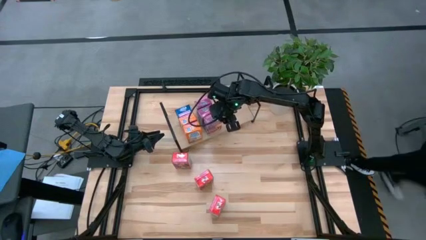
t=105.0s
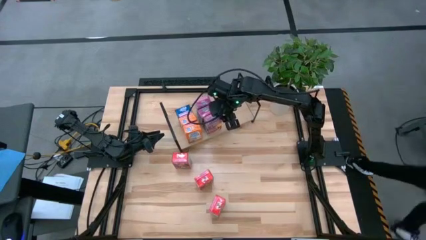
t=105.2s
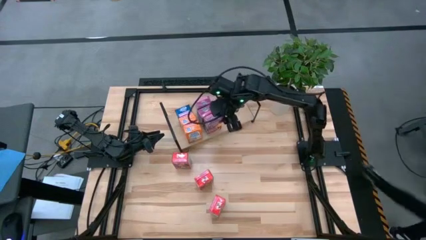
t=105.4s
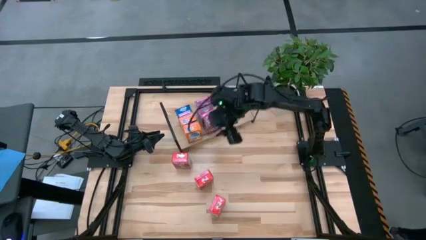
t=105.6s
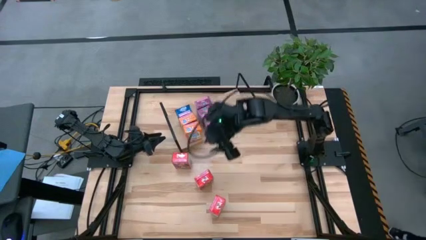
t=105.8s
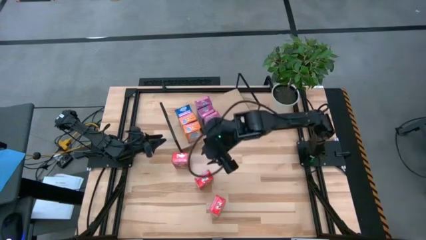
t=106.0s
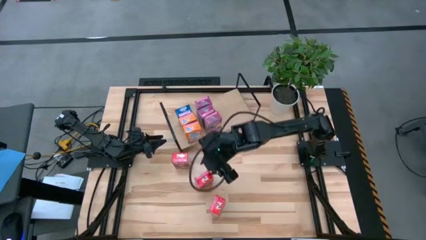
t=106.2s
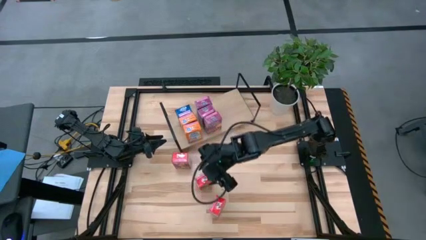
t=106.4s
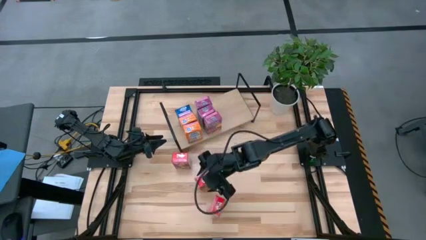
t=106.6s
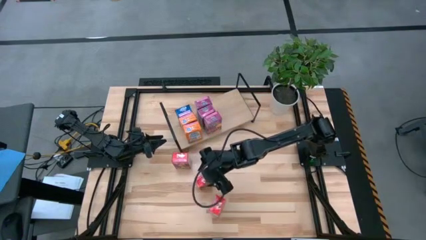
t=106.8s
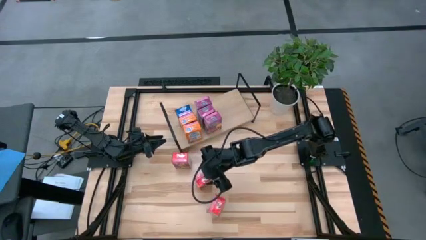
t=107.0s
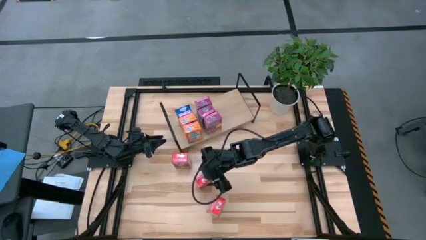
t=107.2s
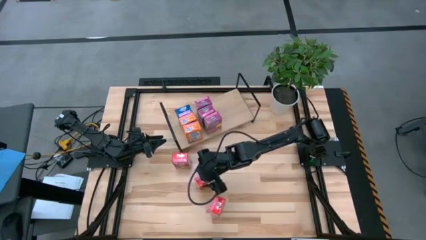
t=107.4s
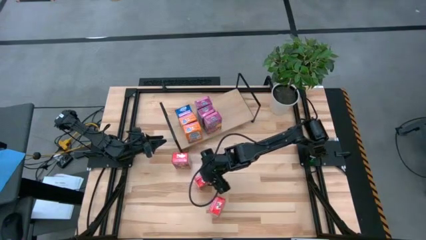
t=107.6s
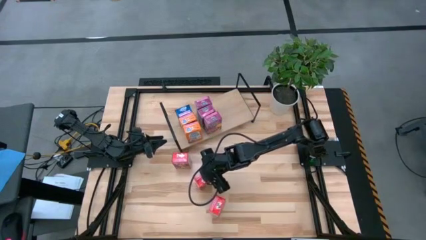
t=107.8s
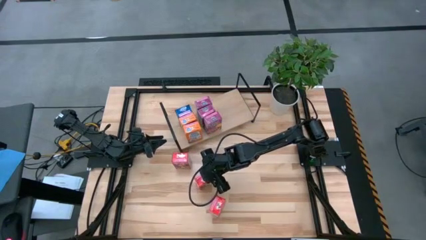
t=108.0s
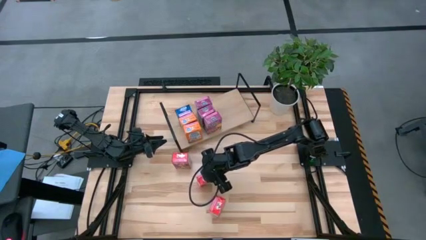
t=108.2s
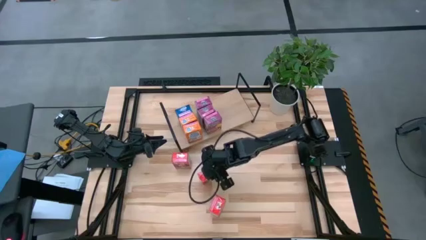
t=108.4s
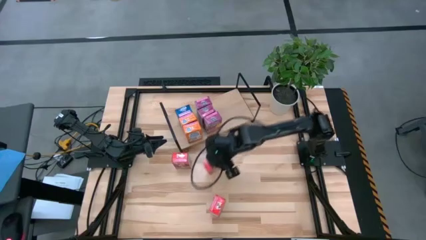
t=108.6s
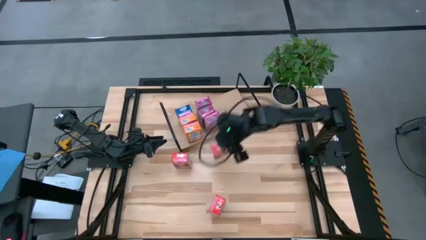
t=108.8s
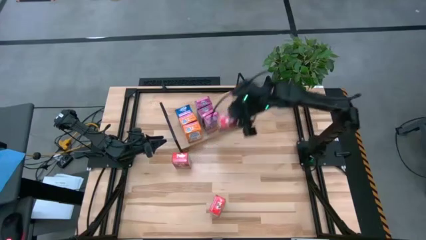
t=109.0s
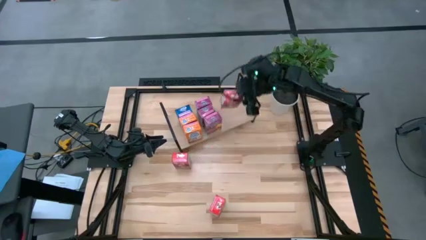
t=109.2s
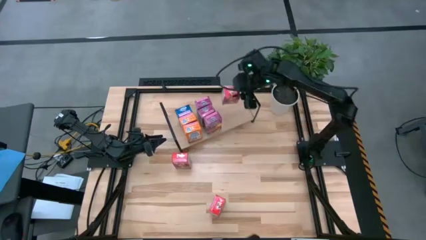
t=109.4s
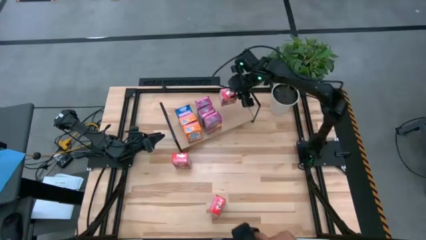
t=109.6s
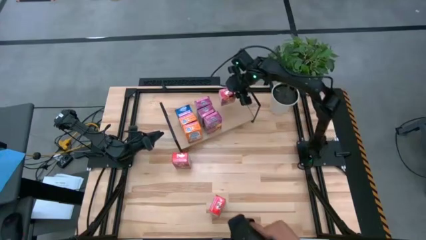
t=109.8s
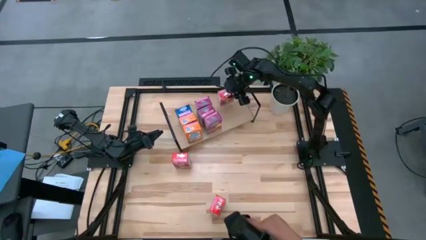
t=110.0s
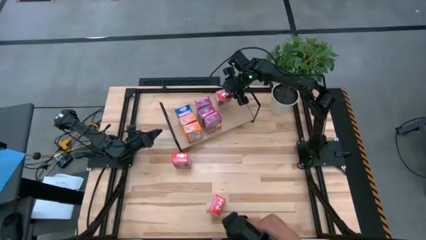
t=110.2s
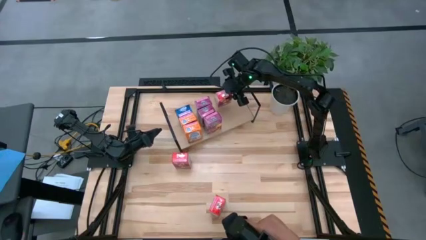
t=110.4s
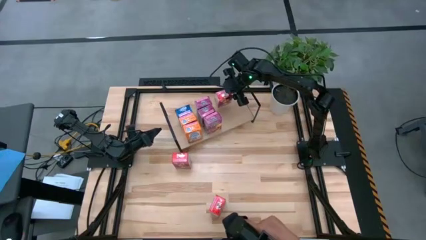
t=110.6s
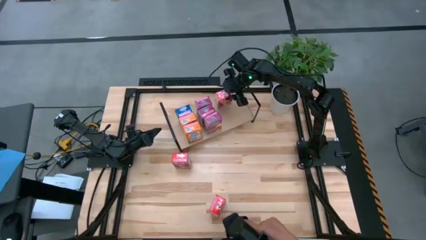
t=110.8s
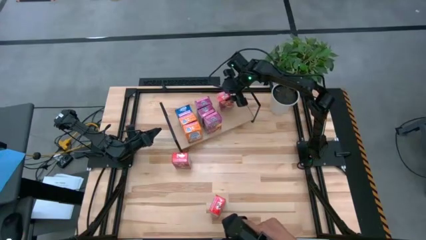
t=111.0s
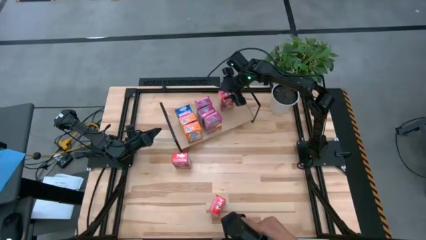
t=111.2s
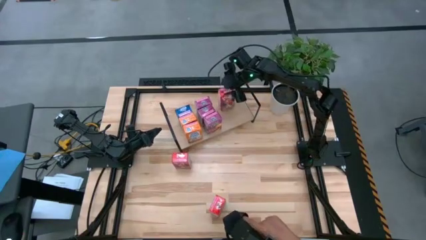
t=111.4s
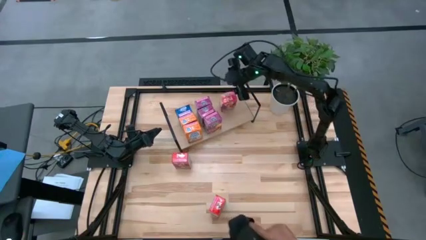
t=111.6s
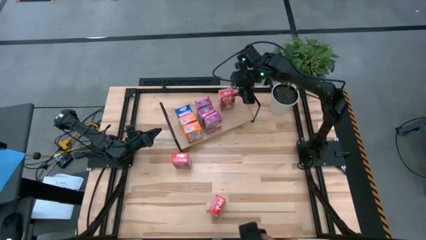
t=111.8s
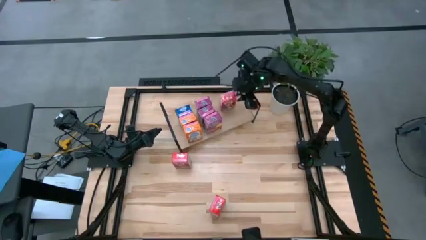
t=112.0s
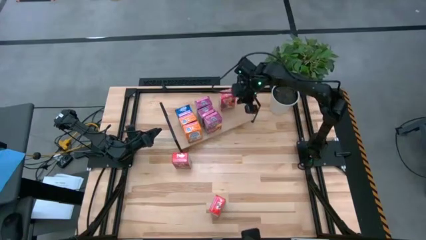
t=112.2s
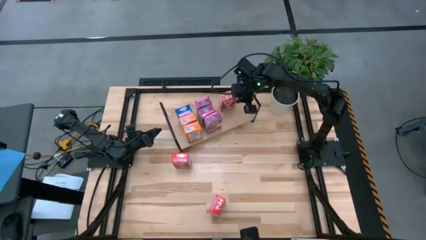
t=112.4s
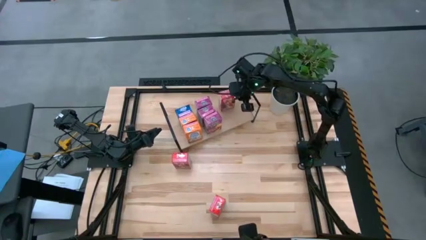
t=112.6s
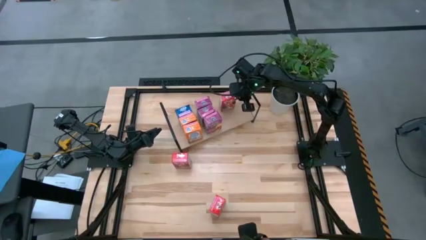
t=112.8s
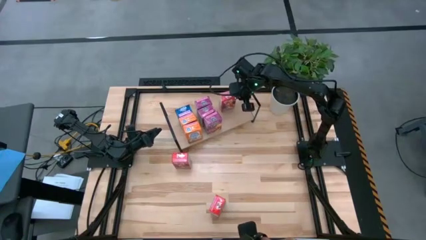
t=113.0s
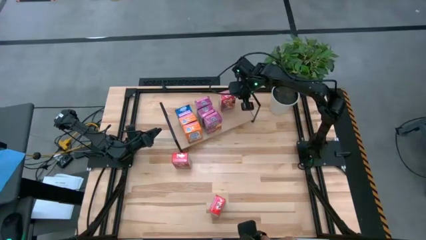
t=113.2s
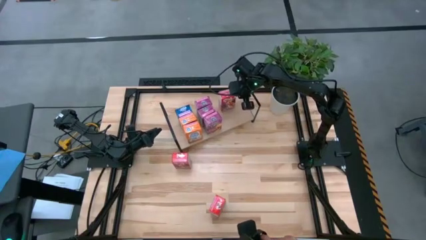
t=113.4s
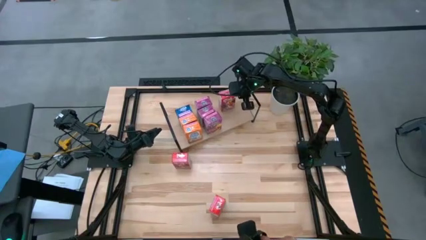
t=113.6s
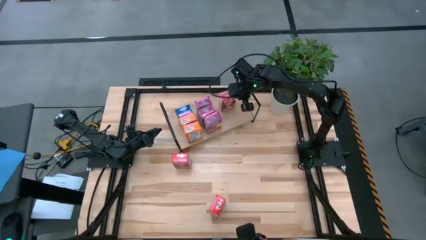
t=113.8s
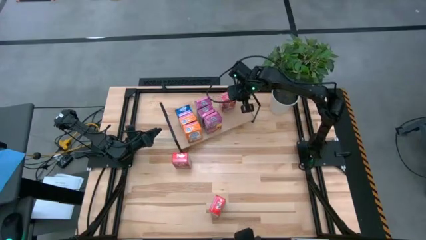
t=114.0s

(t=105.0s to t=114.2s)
Task: Stack cereal on shelf
Put the middle red cereal box on the shelf

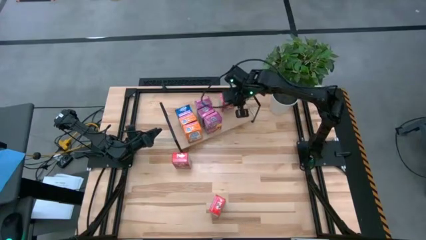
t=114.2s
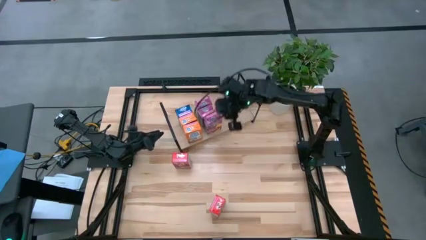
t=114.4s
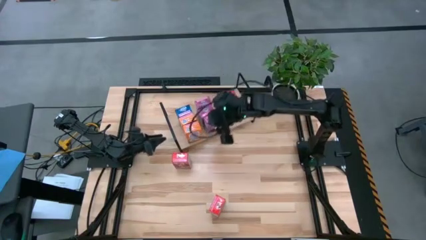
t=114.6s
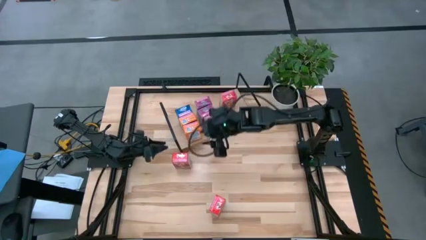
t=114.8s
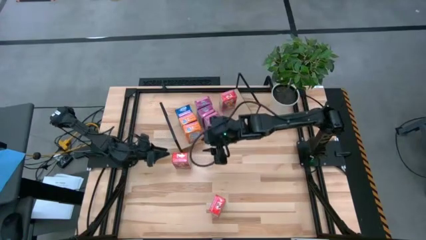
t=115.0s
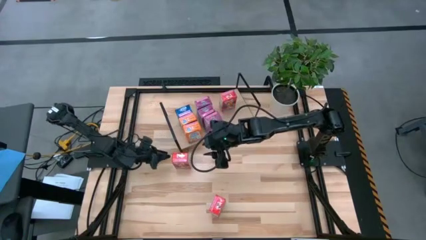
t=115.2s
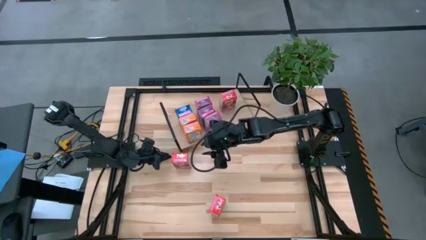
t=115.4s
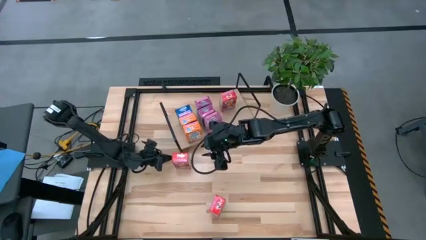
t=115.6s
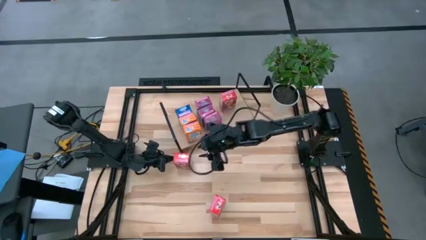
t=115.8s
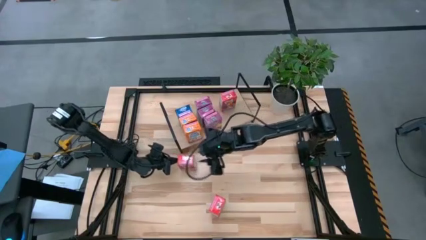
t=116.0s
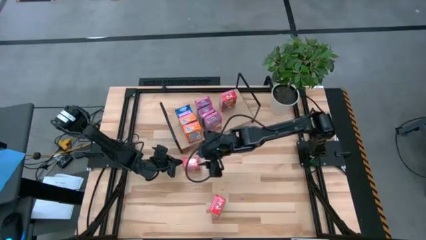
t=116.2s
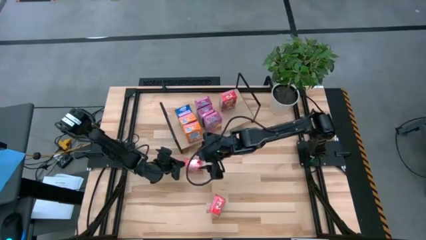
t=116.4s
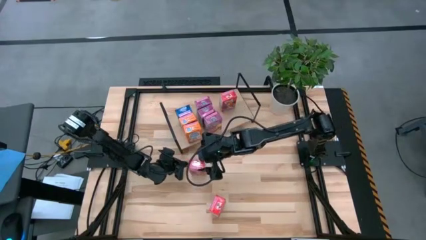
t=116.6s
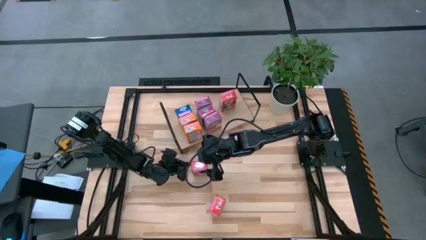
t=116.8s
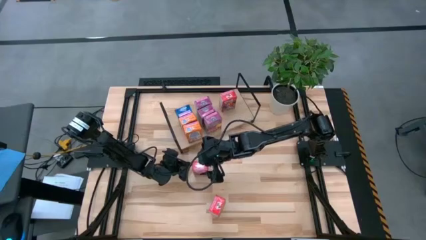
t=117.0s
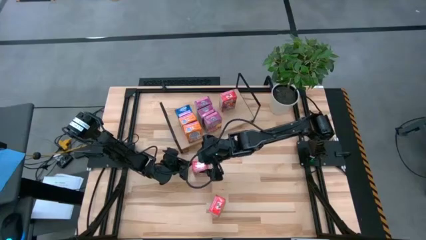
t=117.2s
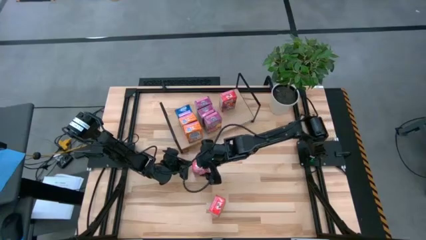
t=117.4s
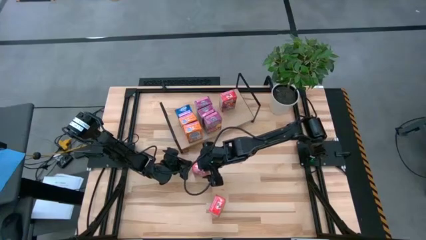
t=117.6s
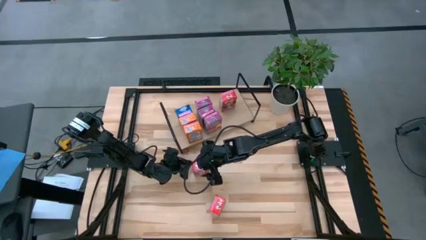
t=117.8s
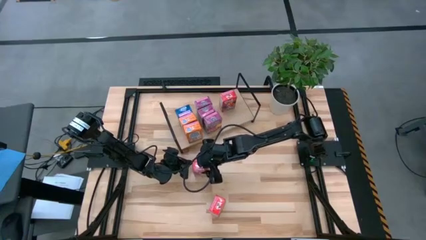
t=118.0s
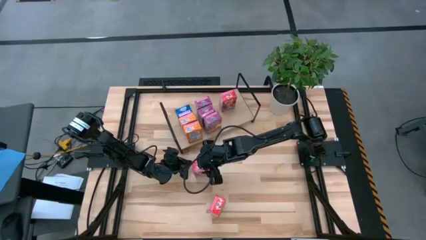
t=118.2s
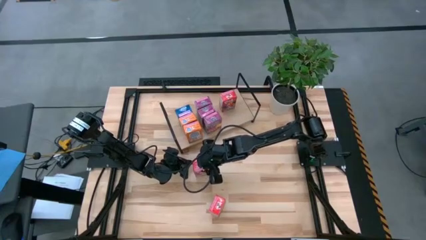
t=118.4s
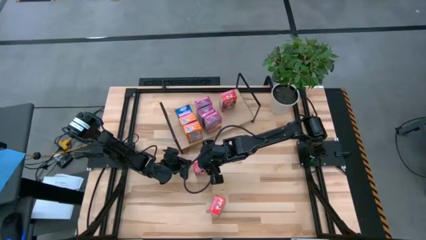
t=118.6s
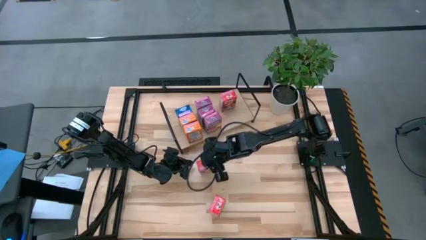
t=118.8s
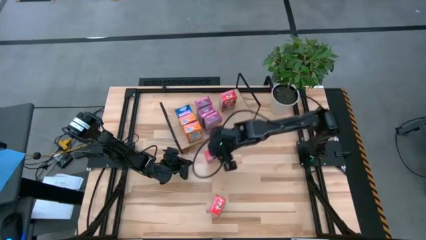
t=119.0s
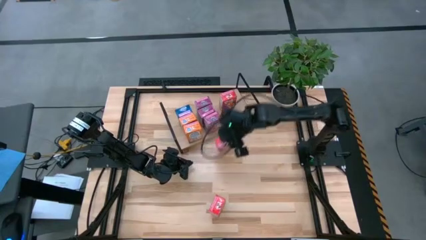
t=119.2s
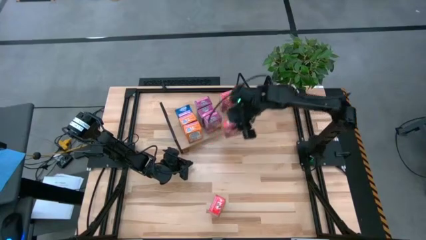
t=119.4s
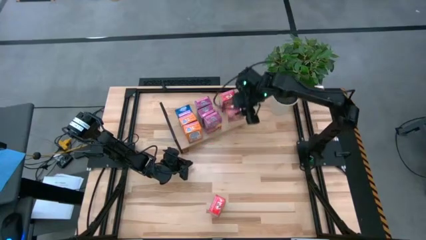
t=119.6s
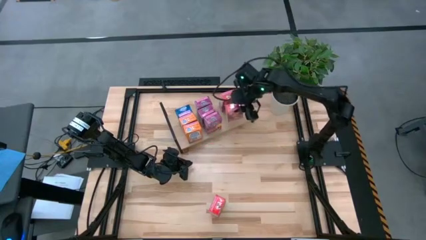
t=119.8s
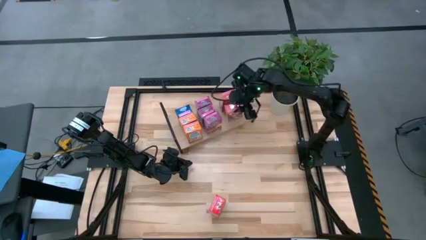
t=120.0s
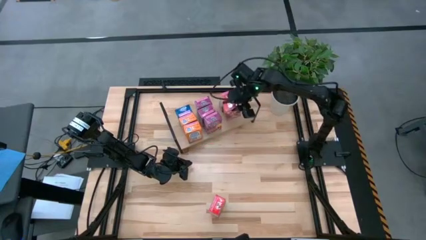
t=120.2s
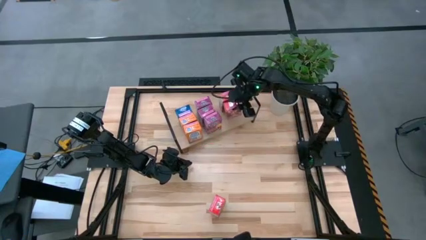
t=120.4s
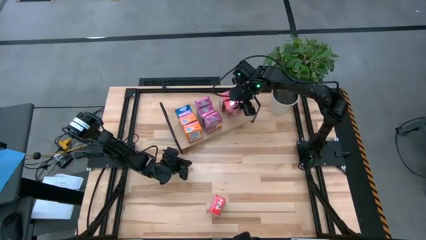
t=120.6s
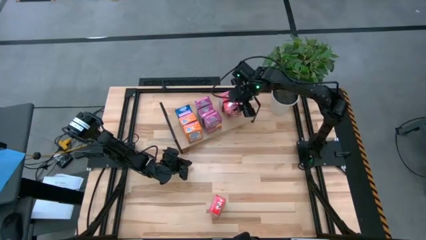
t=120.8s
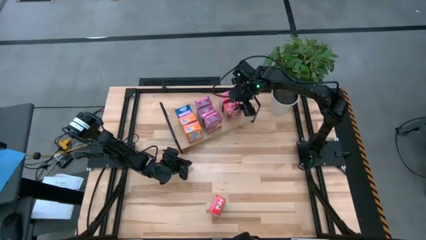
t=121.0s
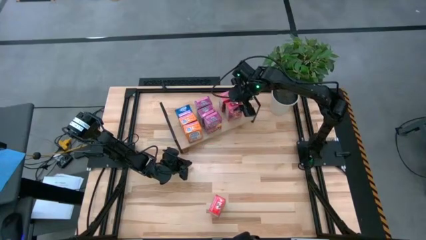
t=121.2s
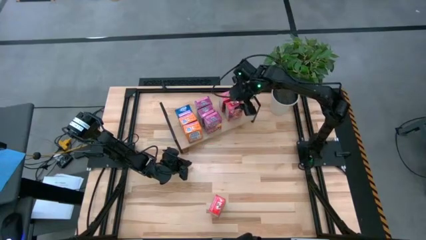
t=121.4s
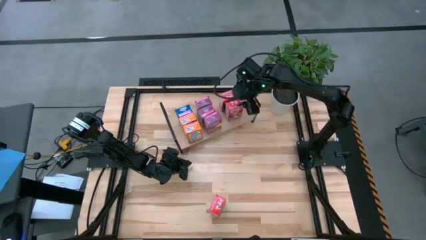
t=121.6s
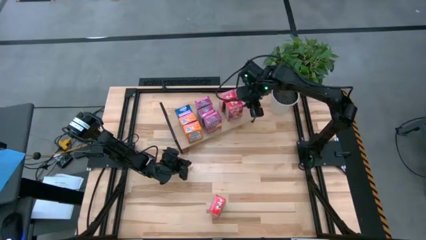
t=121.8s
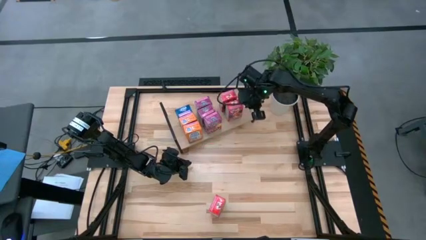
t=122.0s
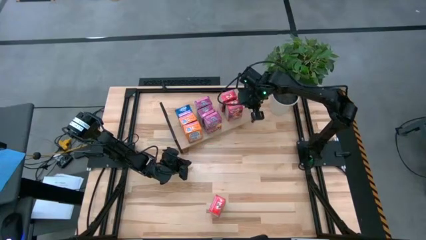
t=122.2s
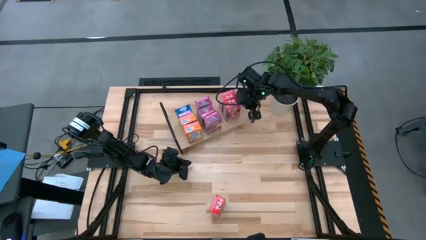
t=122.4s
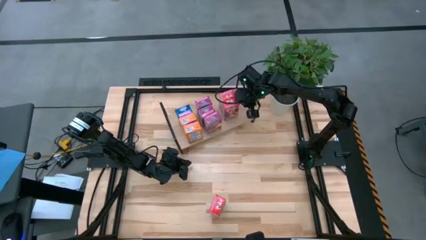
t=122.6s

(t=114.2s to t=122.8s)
Put the top red cereal box on the shelf aligned with the other red cereal box
